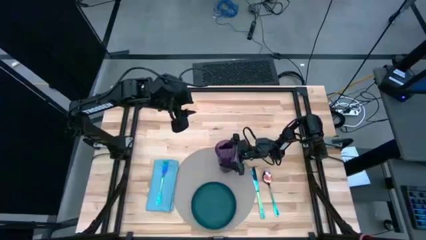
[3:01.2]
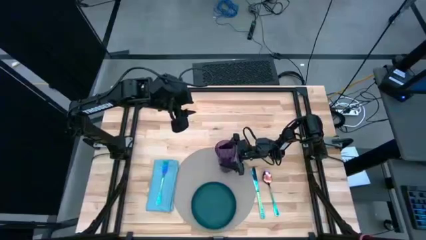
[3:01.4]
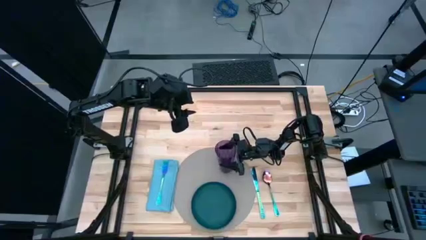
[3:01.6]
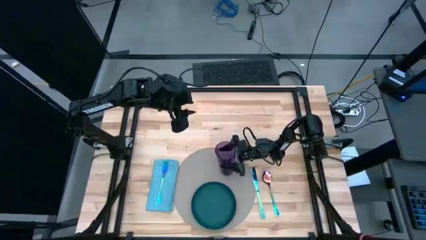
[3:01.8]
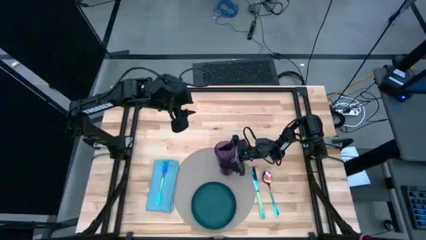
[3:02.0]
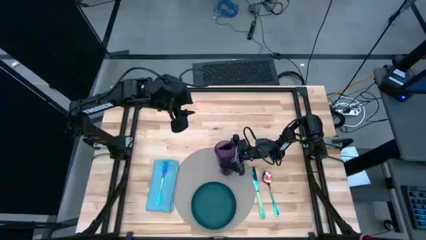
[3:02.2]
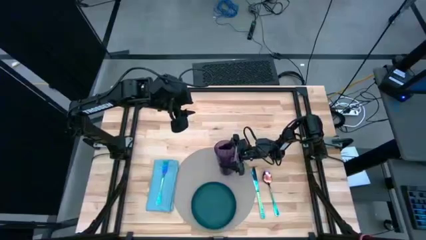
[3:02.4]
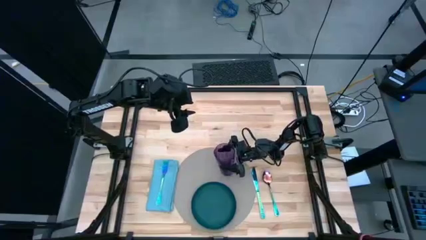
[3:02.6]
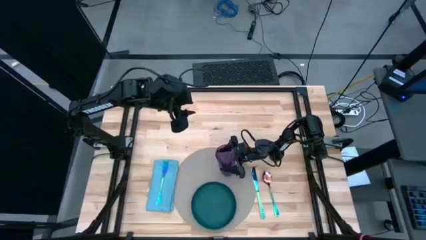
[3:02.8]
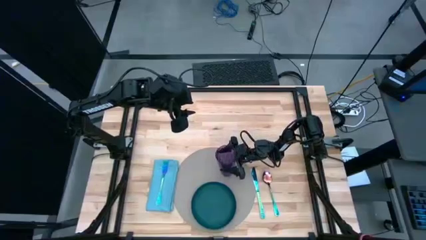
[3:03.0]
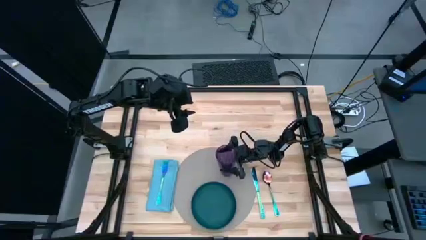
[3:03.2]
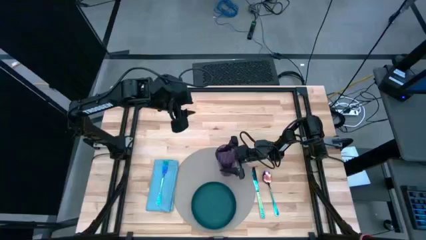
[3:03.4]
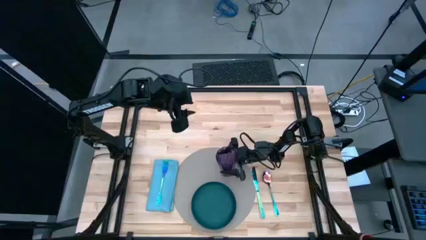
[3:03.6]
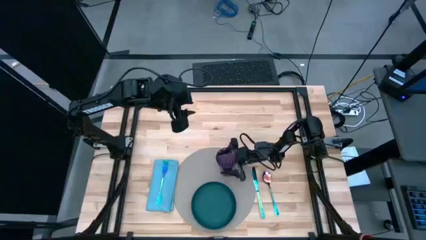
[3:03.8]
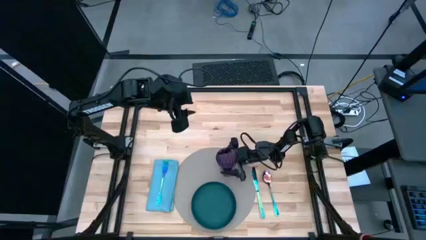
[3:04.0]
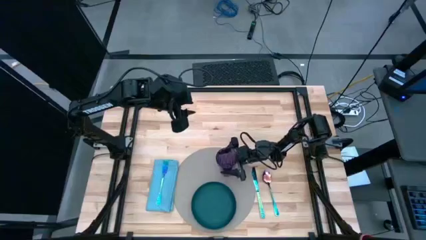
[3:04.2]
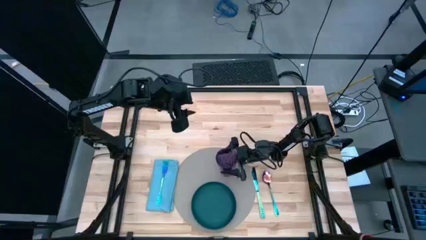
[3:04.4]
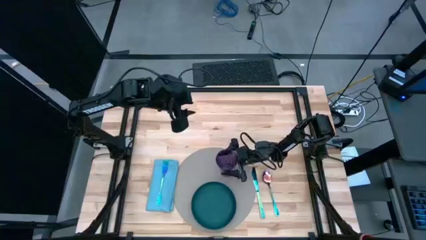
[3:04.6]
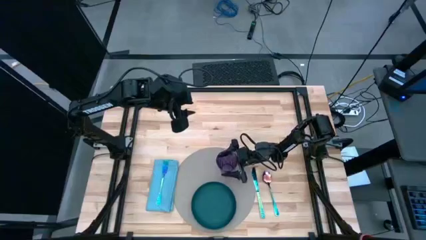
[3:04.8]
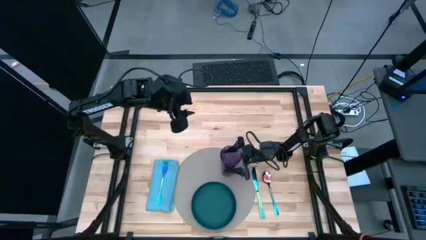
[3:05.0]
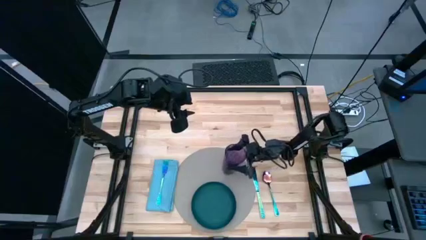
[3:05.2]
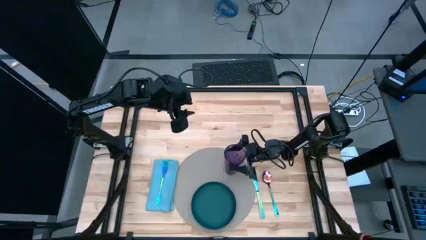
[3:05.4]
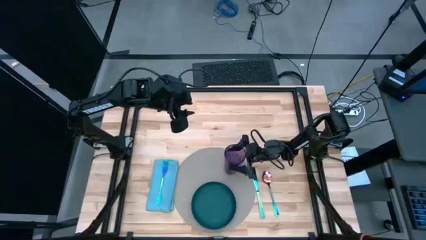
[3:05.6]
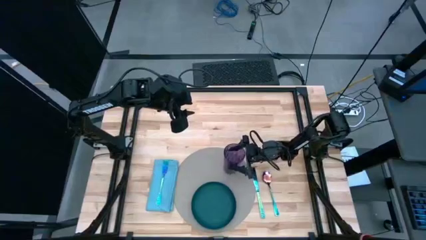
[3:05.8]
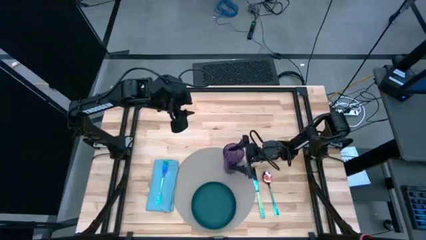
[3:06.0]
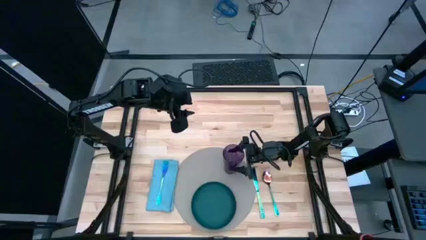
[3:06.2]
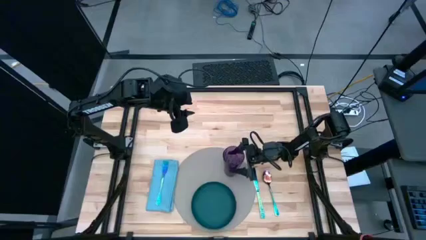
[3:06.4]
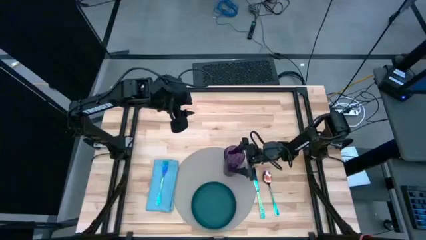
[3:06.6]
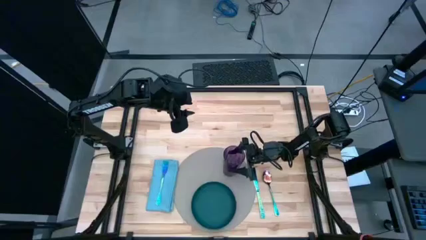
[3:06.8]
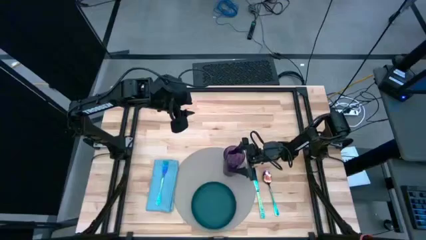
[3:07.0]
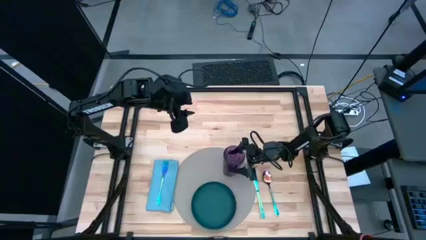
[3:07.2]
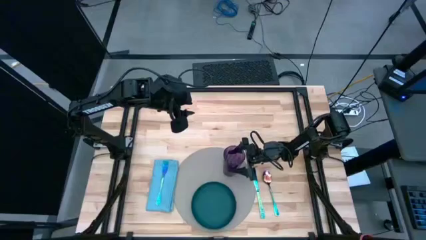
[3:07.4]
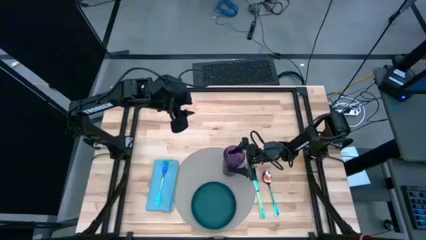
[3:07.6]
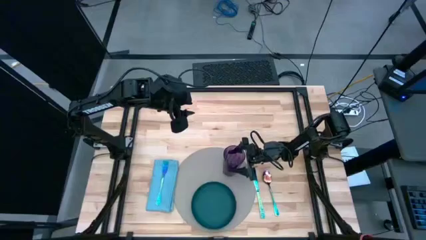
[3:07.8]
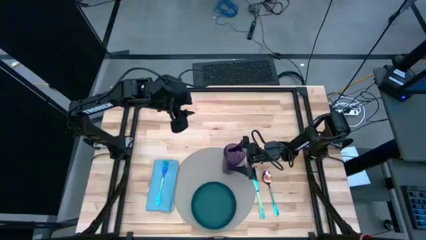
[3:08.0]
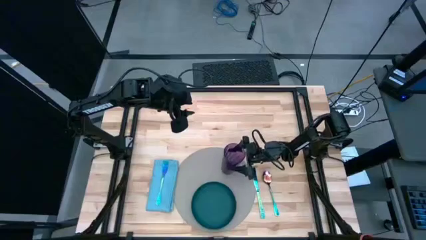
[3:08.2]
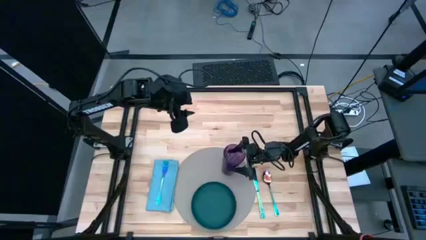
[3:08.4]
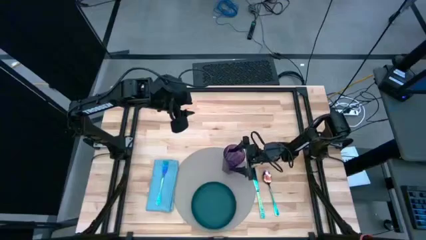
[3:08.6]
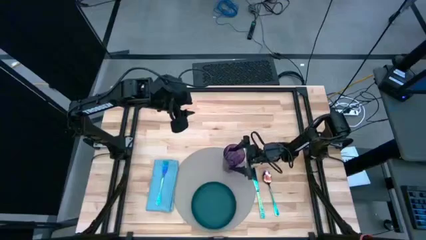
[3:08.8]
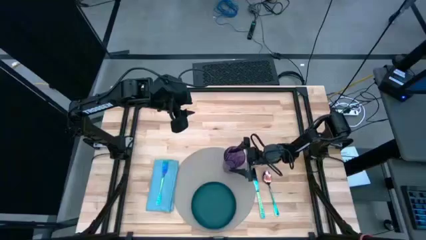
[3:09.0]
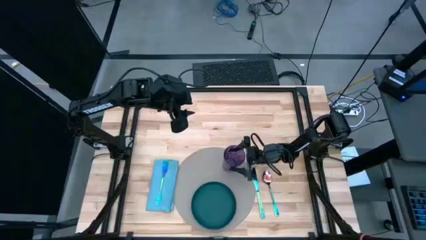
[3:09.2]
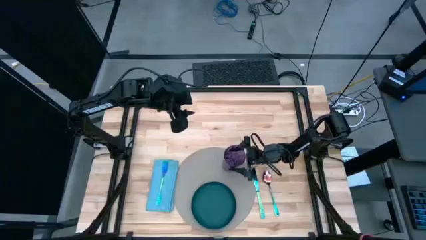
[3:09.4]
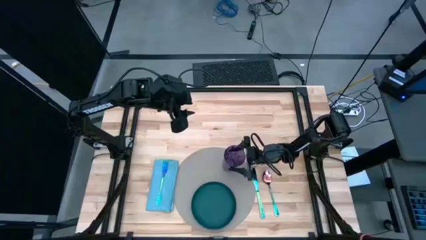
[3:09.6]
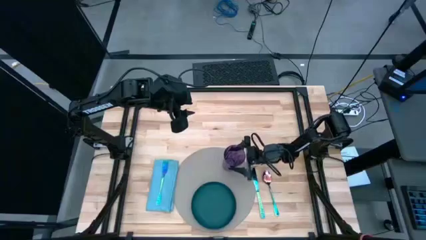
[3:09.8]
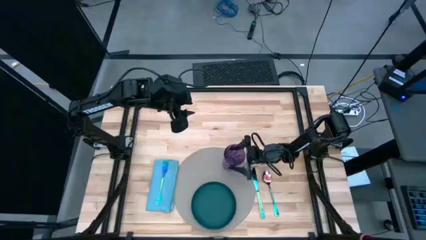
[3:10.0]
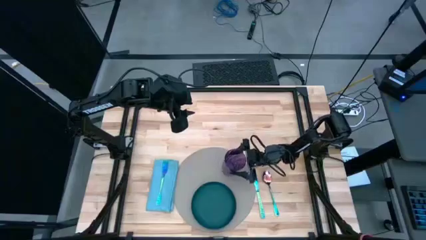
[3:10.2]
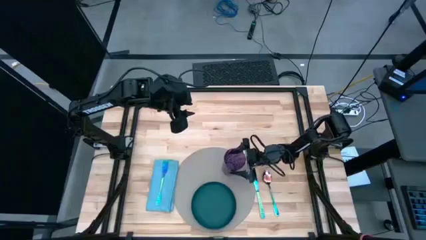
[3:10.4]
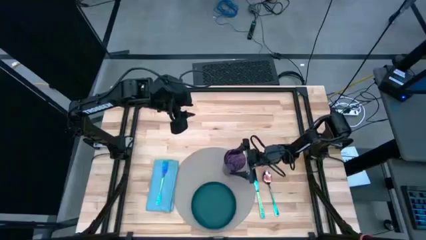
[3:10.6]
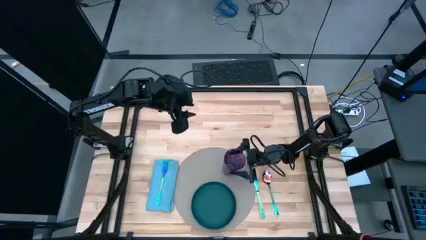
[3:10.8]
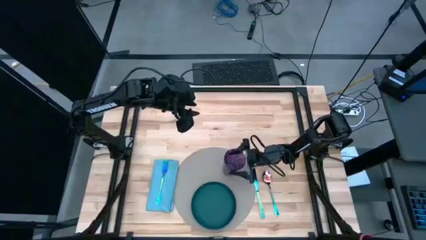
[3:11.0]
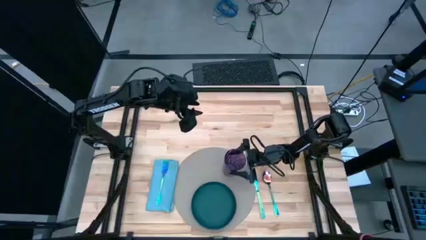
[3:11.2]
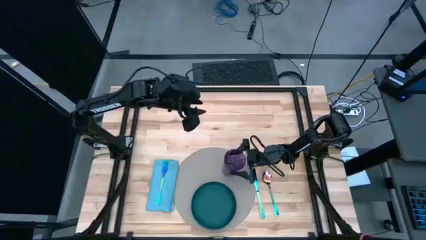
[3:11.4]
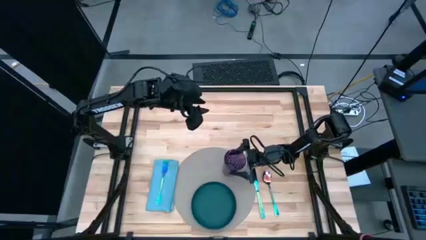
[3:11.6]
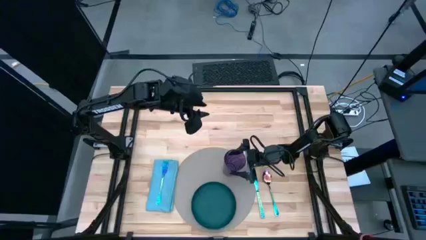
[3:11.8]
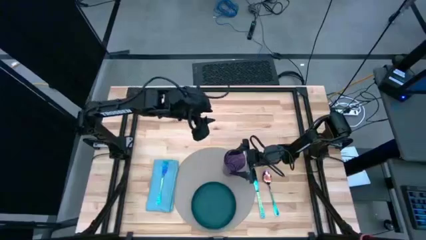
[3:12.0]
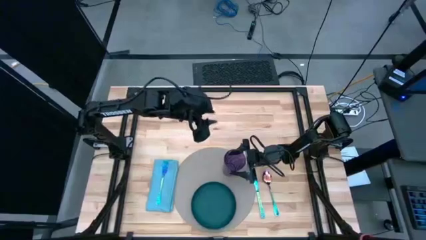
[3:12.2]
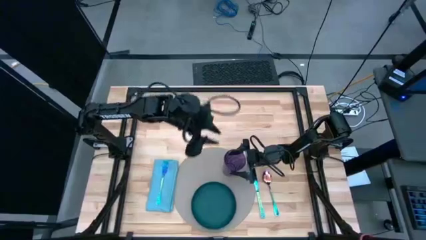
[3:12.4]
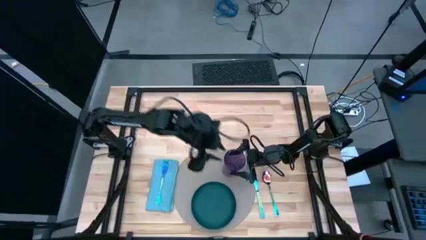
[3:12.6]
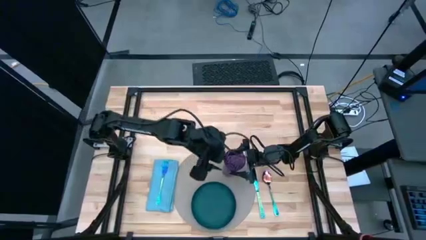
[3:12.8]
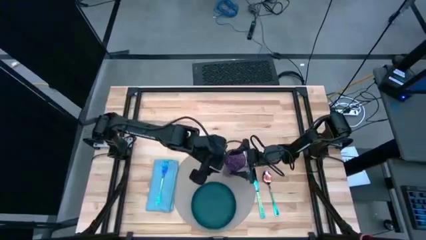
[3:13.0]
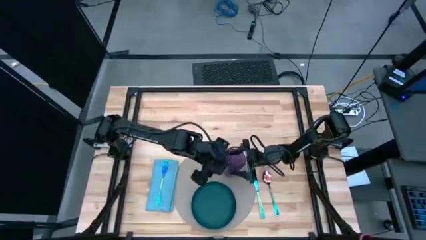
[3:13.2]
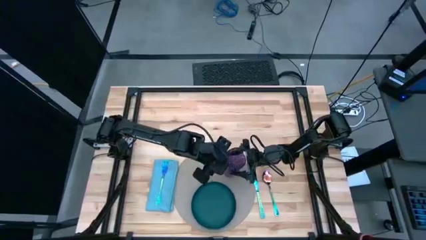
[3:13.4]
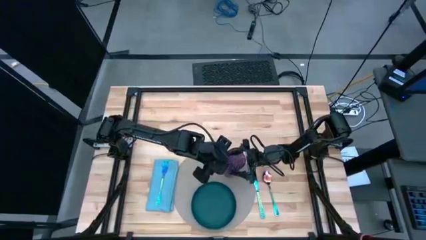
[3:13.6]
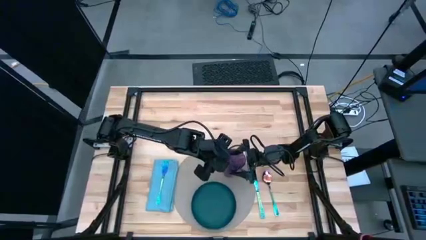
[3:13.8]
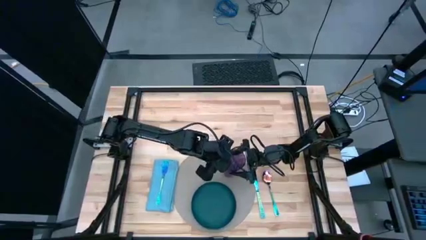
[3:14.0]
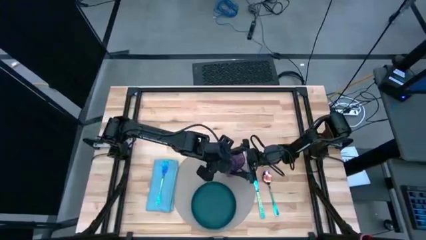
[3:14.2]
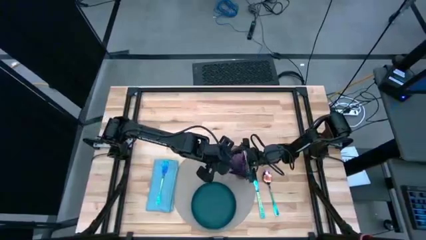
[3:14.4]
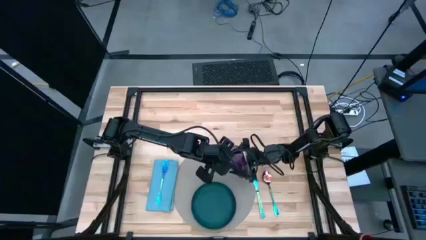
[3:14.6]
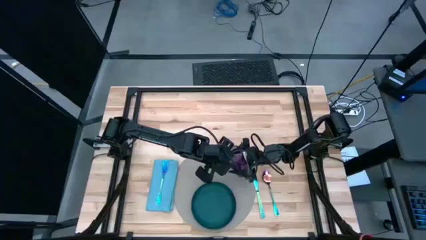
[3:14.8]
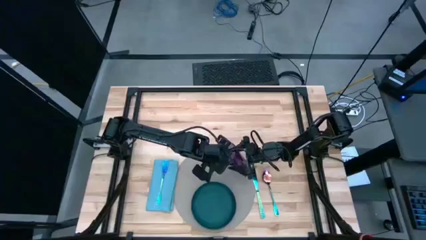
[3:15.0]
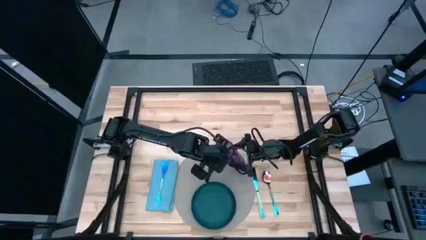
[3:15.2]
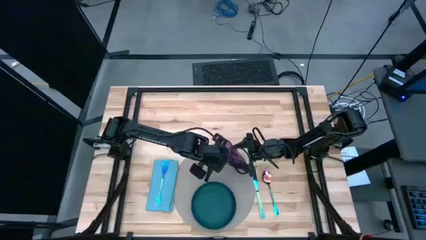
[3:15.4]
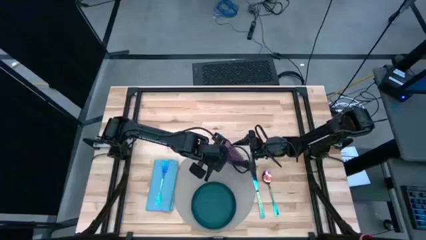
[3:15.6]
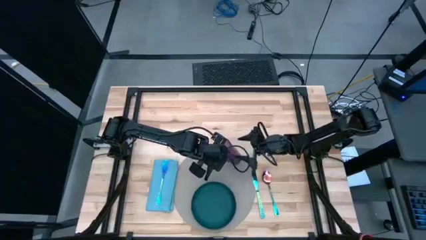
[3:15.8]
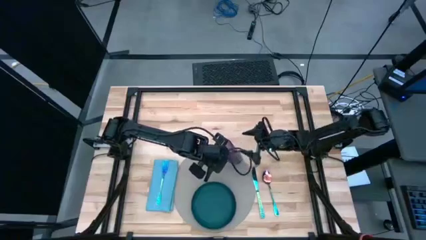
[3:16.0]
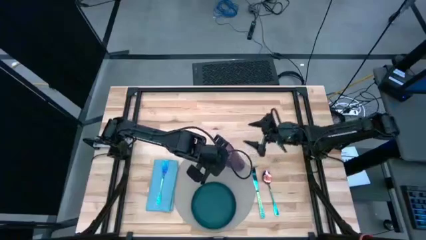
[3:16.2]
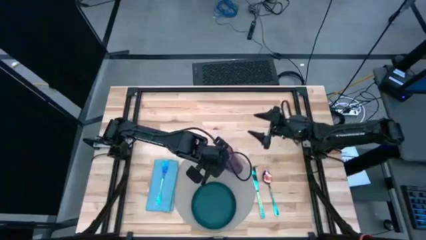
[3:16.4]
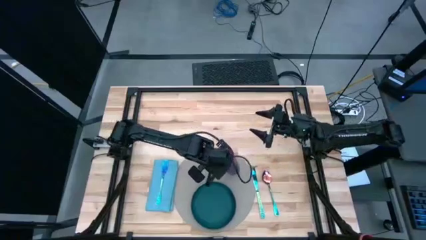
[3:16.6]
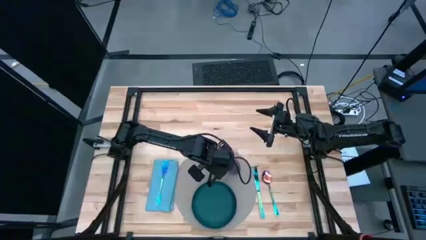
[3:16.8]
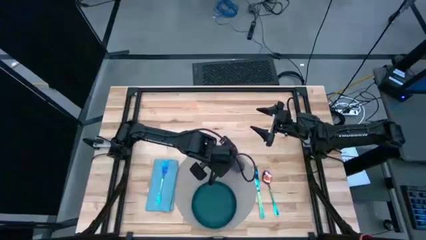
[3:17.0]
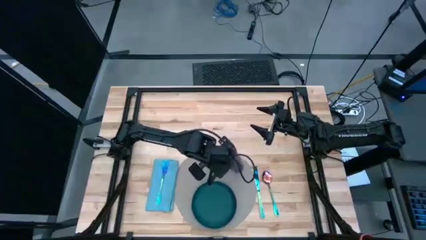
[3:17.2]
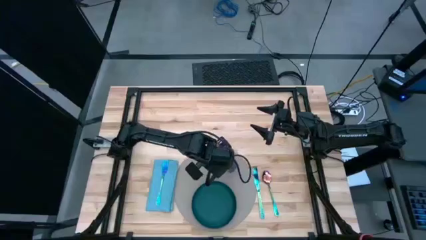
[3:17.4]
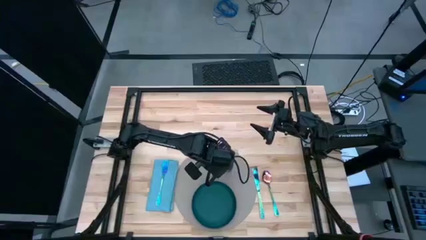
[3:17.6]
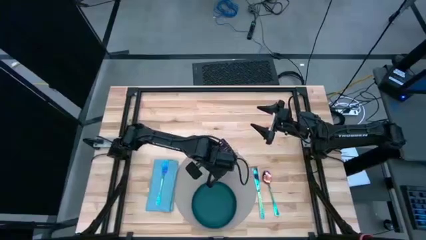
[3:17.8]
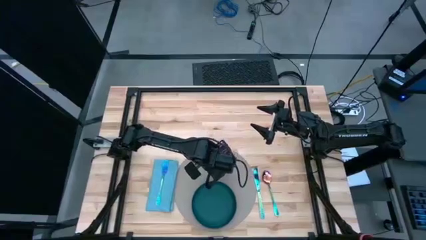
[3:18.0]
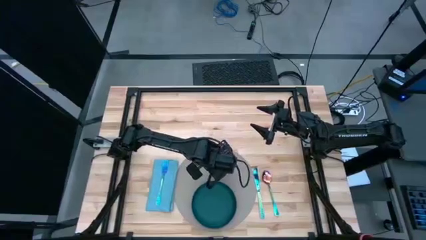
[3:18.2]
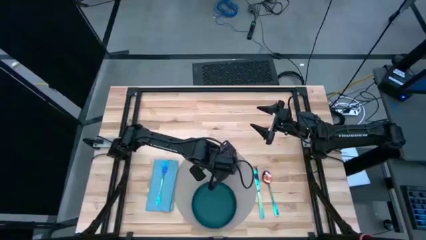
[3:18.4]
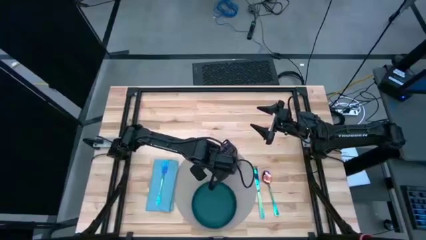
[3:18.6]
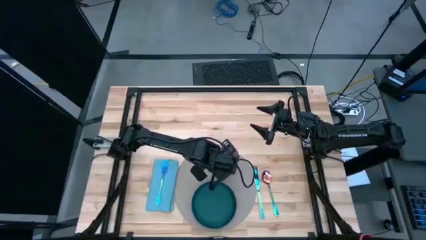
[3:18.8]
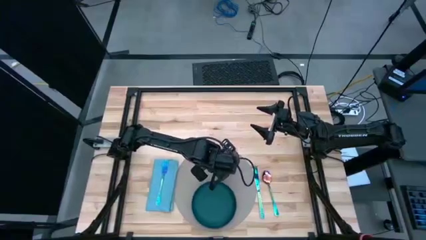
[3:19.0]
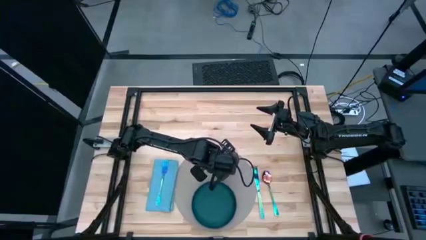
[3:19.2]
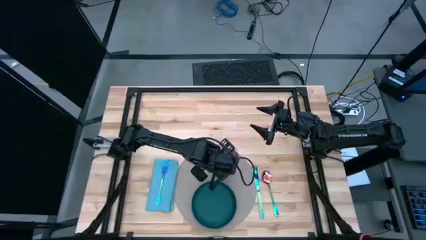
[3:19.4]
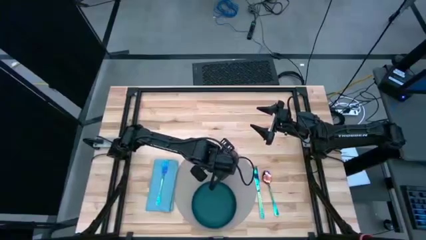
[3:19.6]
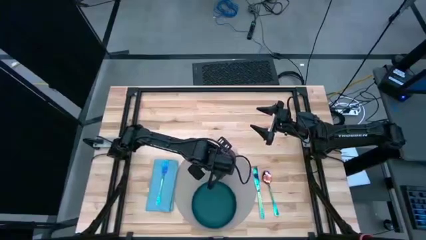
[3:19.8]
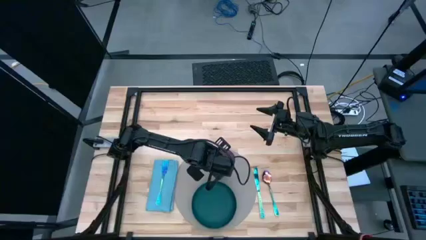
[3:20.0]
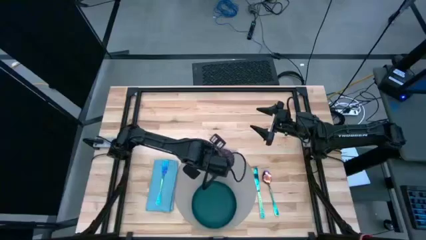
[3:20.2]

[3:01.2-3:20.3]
Task: Set table place
Put the purple glass on the gray placemat to the top of the green plate
